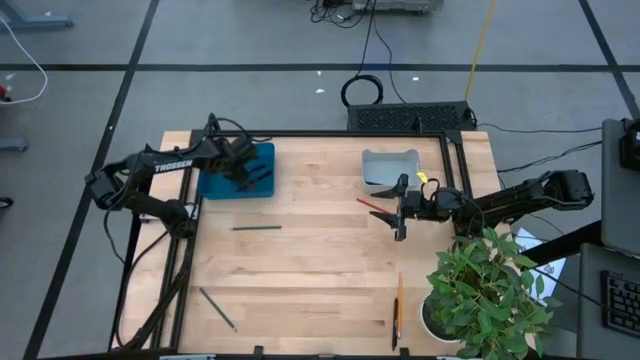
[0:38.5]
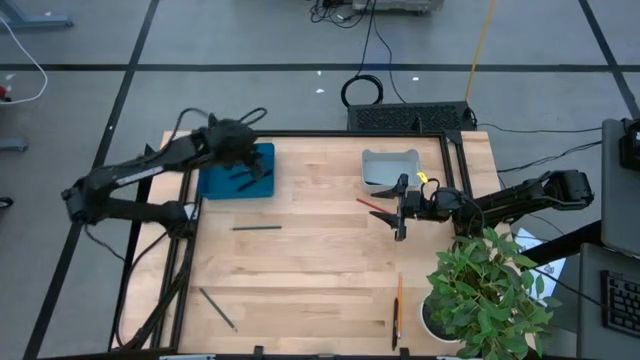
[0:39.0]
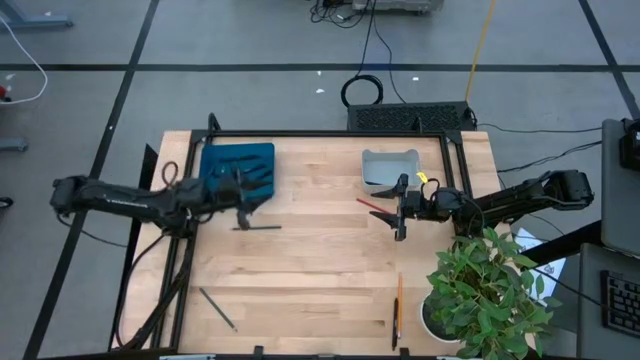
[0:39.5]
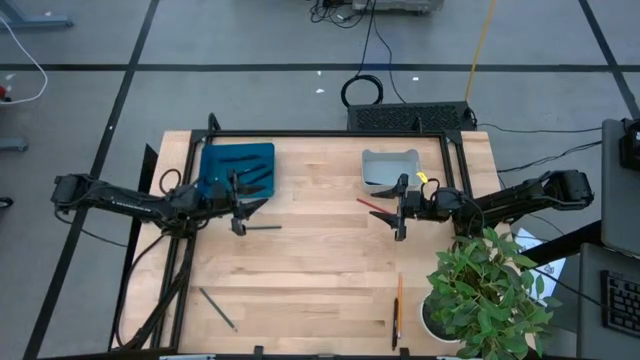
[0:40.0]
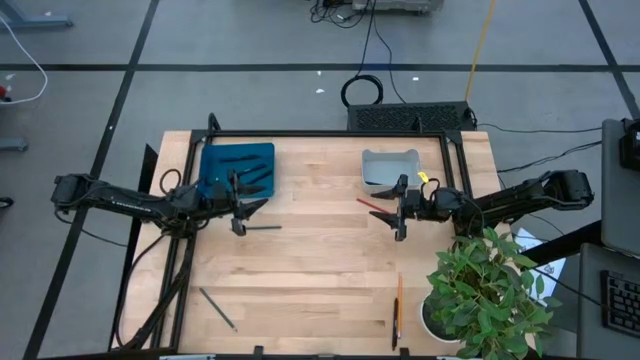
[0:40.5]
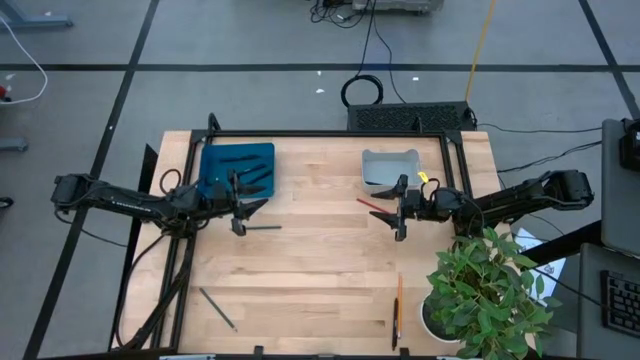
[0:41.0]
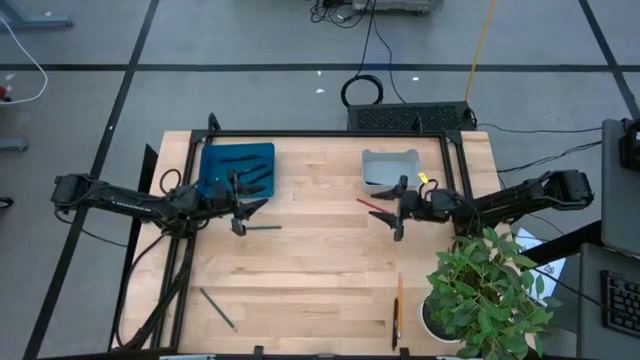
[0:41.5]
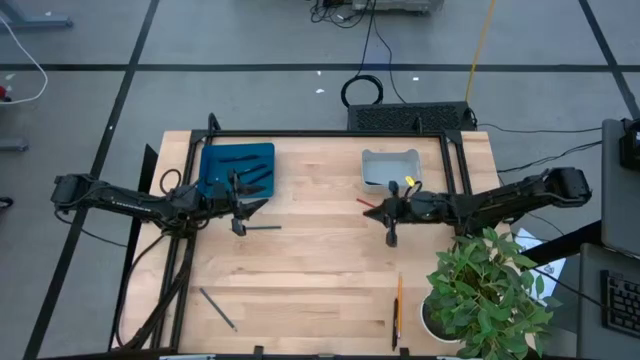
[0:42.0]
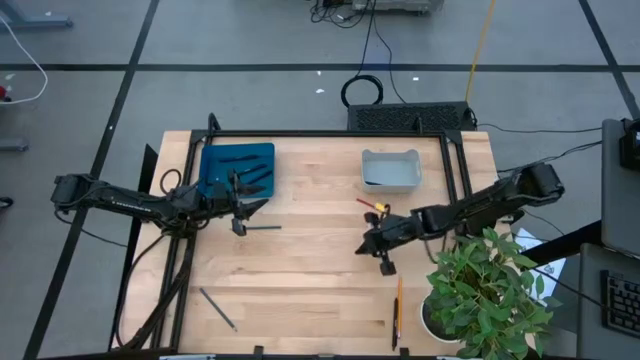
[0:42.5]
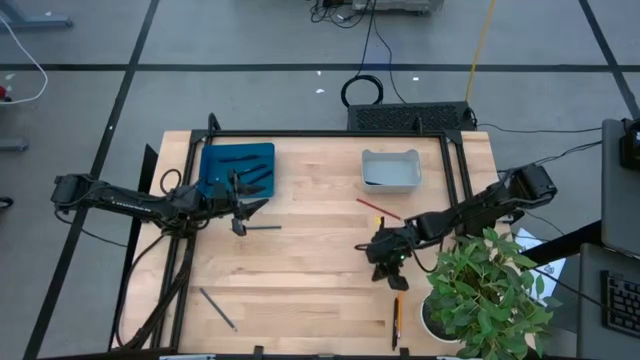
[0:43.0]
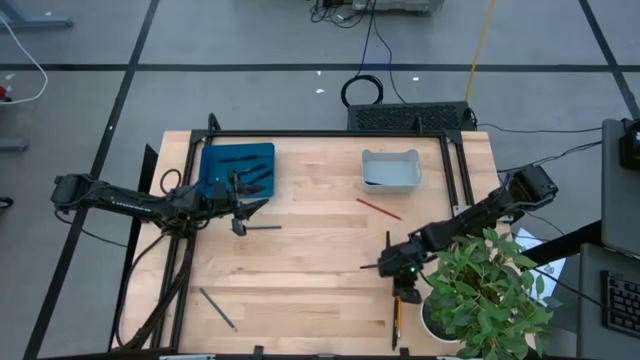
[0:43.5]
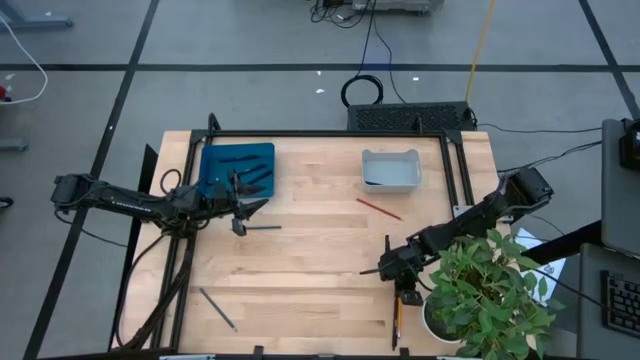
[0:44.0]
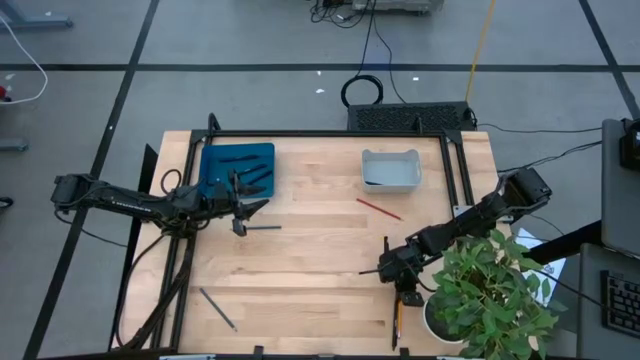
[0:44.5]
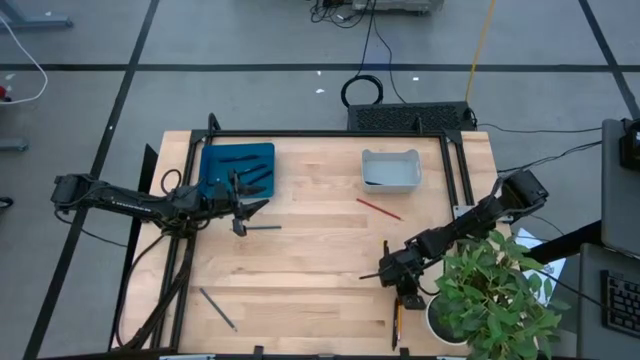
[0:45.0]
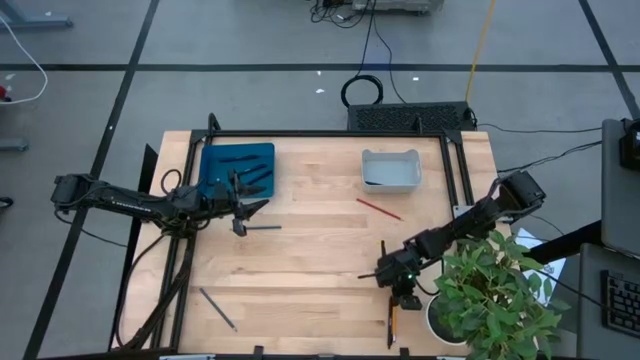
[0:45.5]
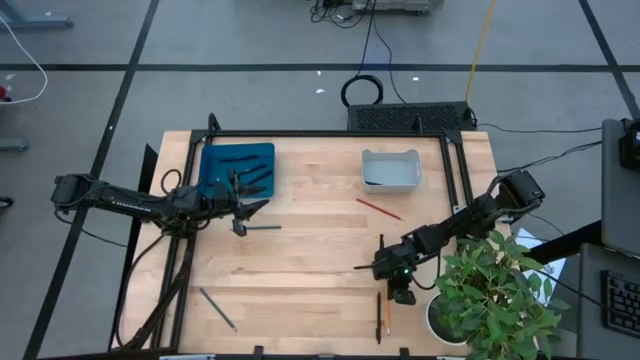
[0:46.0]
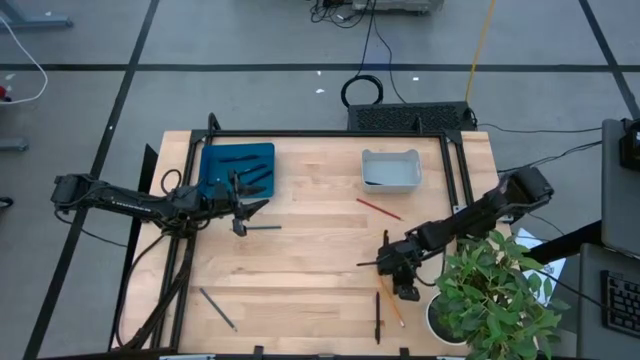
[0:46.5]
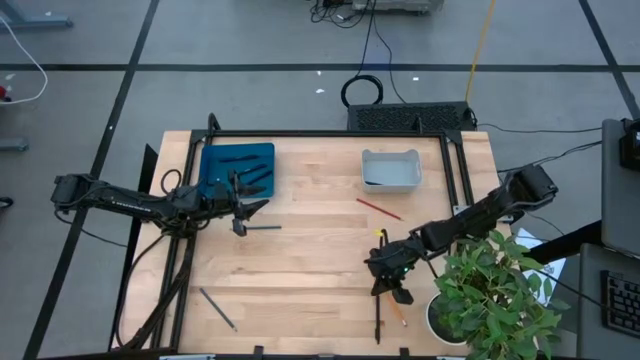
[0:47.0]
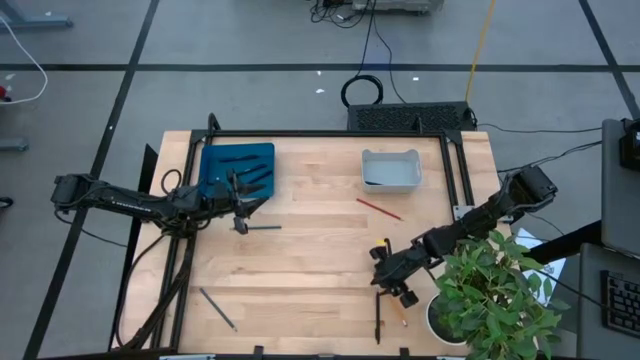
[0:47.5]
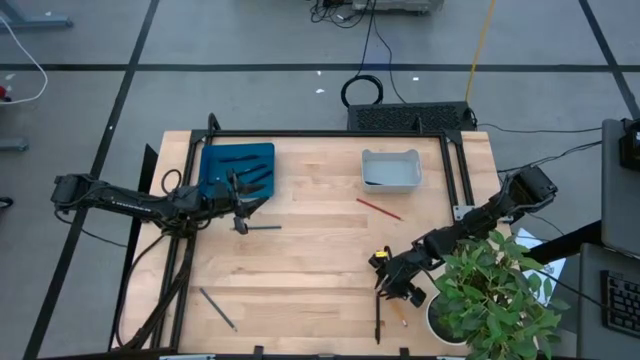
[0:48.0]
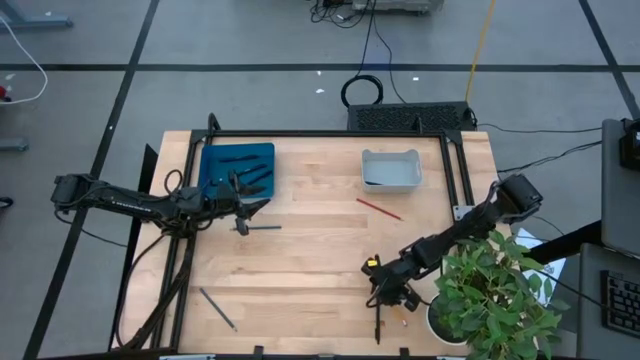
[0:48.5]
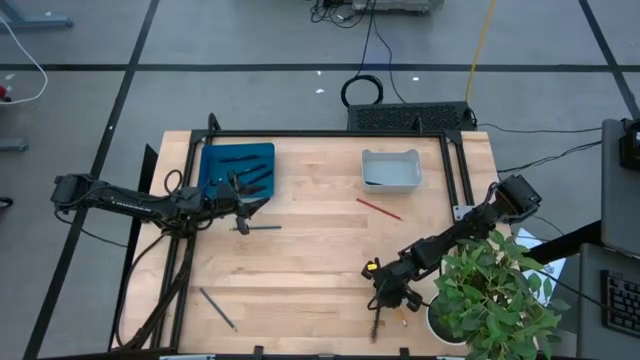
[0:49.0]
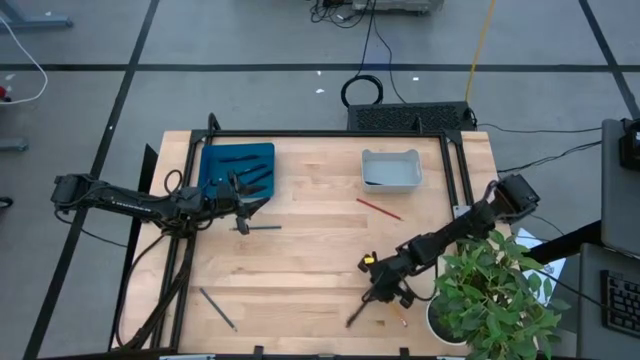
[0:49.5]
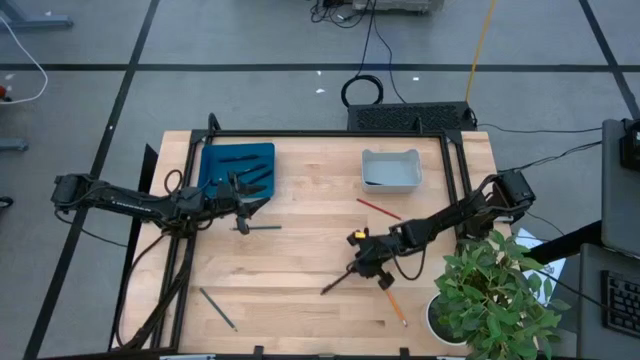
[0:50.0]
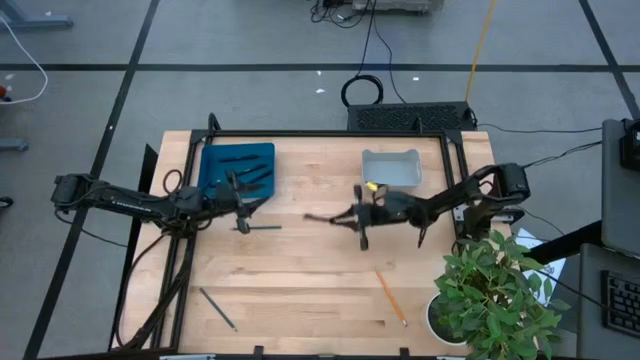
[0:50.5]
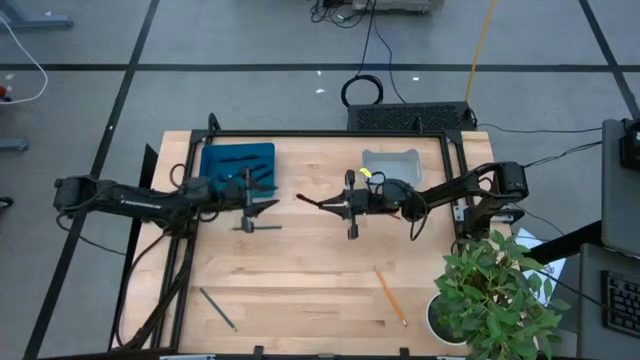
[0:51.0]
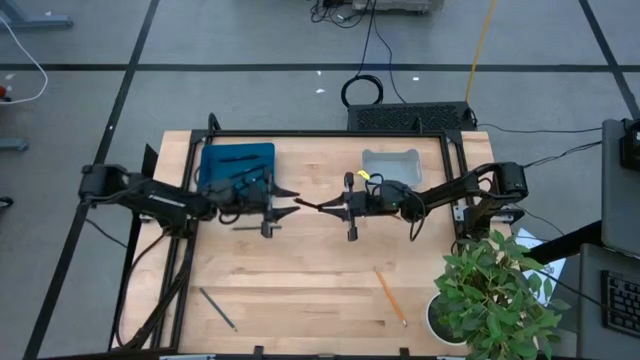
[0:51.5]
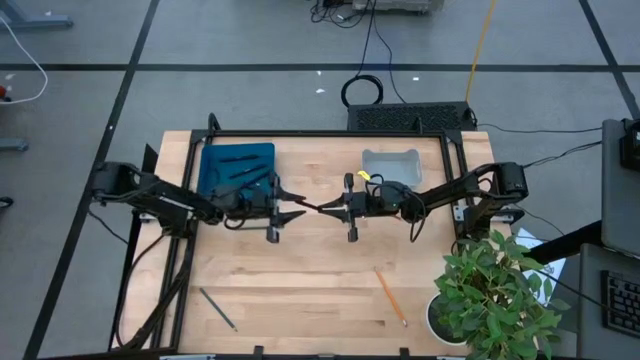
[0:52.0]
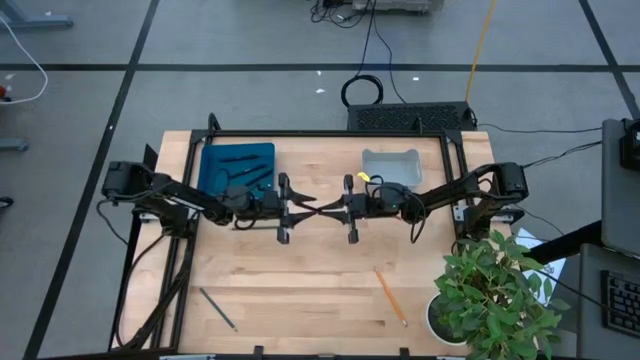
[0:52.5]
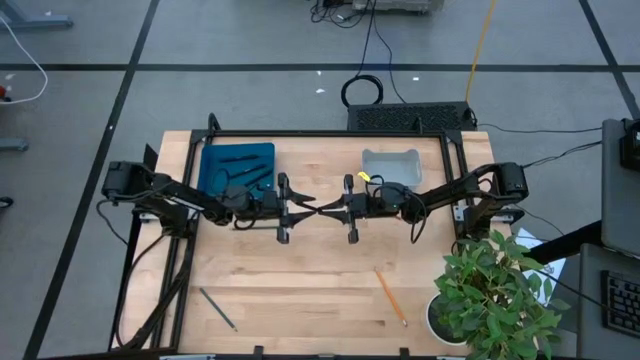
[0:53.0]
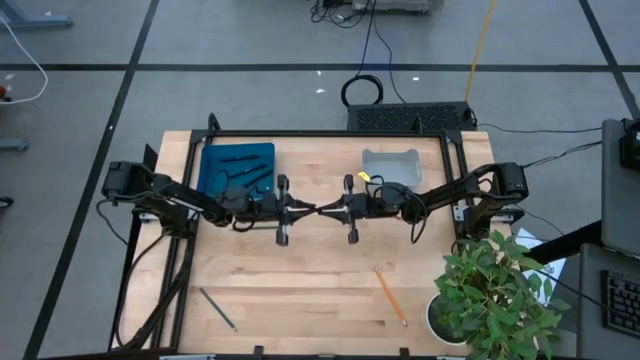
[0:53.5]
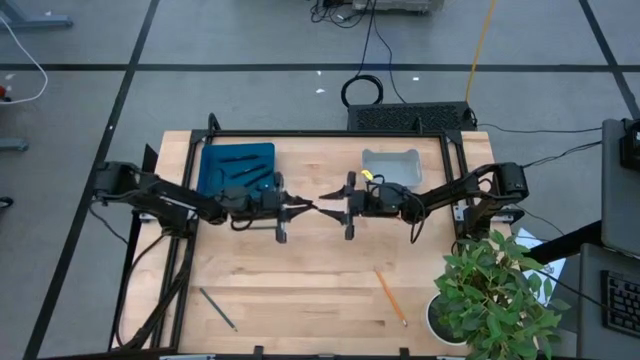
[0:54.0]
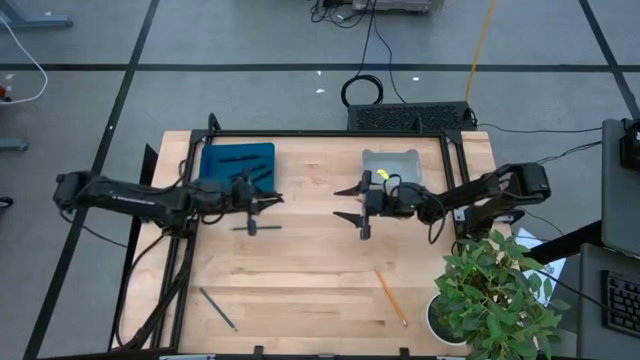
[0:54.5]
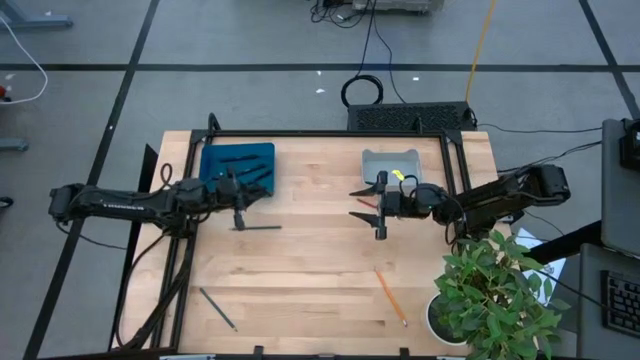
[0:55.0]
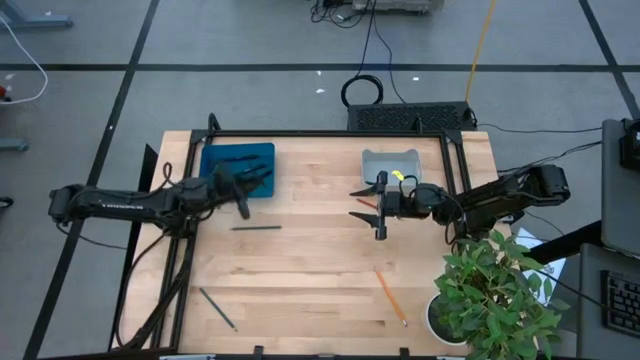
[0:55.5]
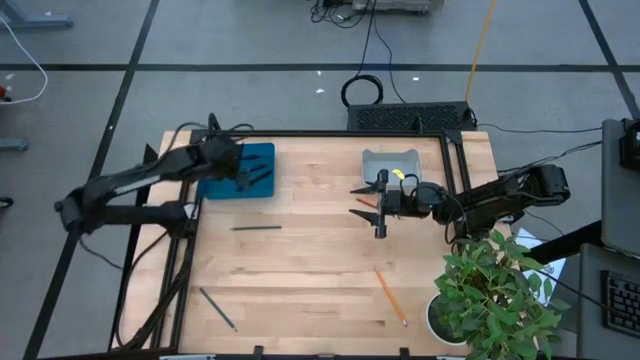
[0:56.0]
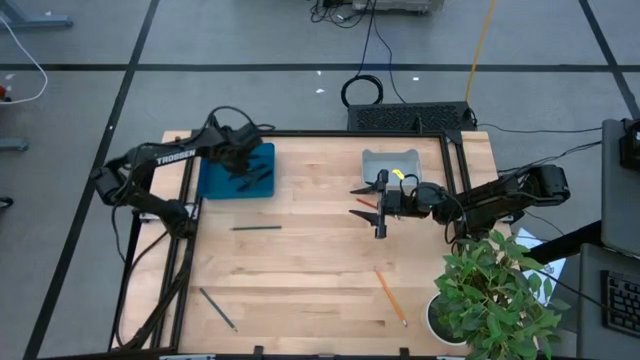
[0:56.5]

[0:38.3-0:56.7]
Task: Sort pens & pencils
Put the black pen into the blue bin

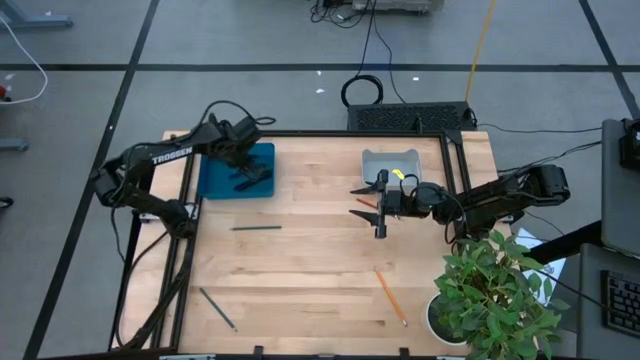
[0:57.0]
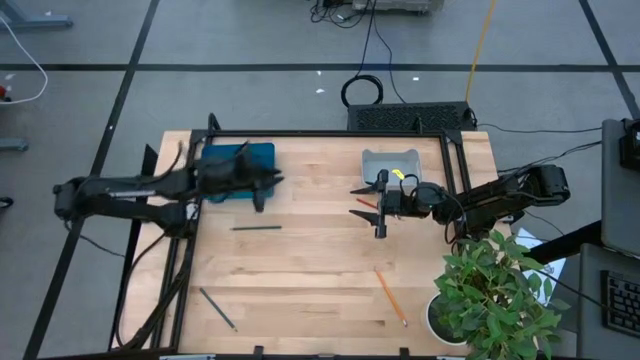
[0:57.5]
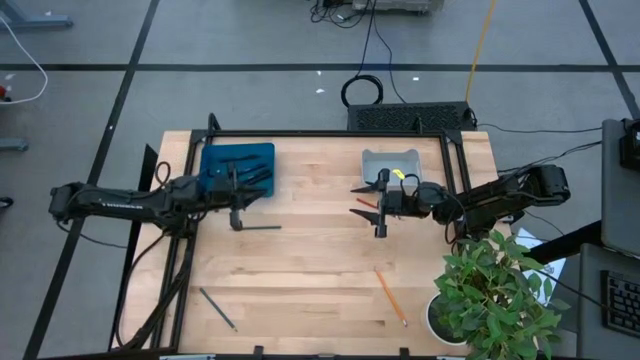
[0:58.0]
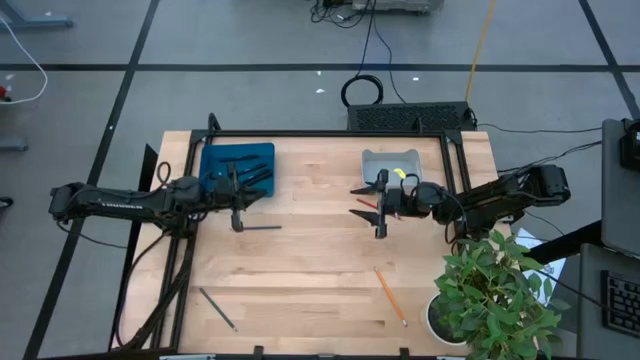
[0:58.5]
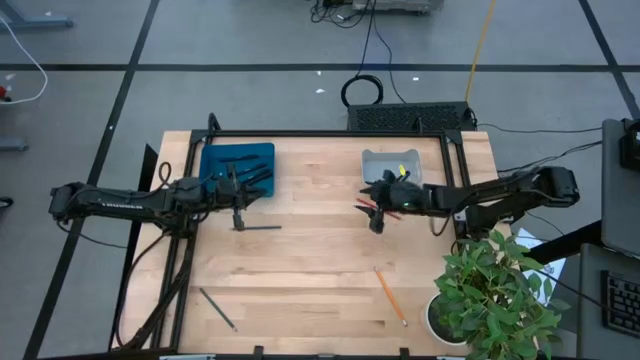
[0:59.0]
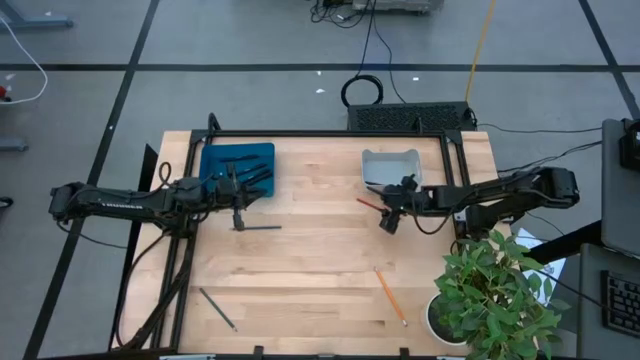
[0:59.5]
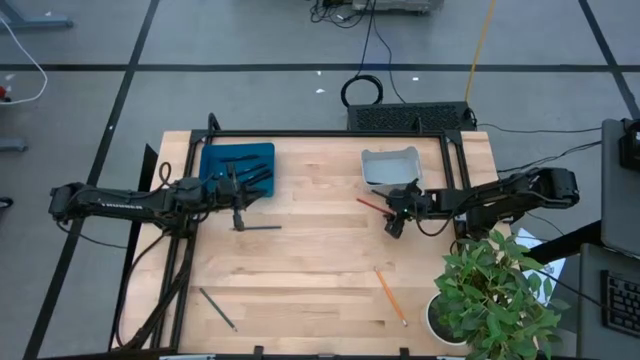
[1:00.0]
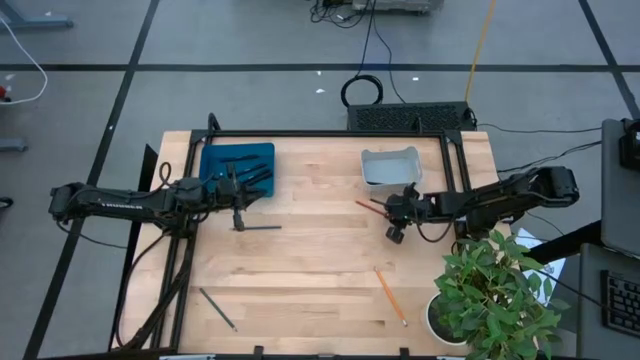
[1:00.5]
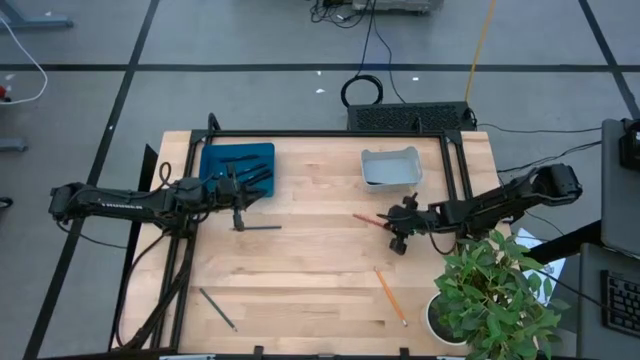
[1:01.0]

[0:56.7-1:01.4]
Put the red pencil into the gray bin
